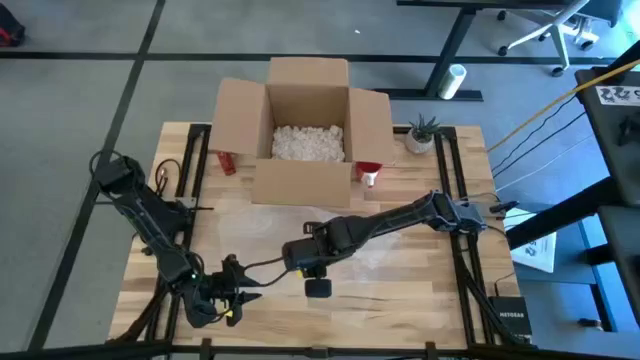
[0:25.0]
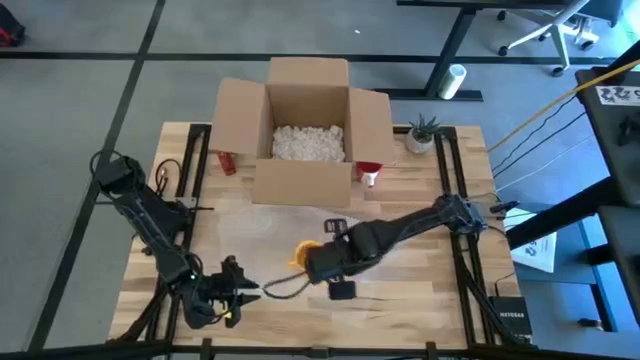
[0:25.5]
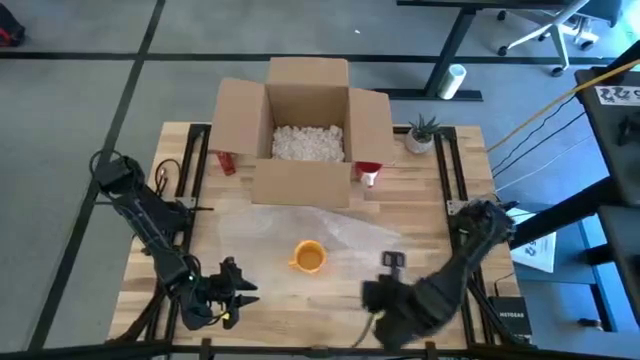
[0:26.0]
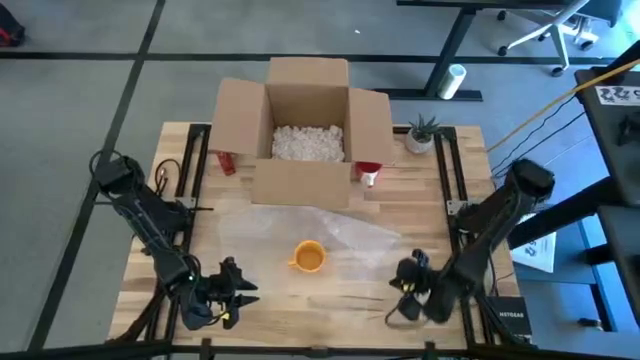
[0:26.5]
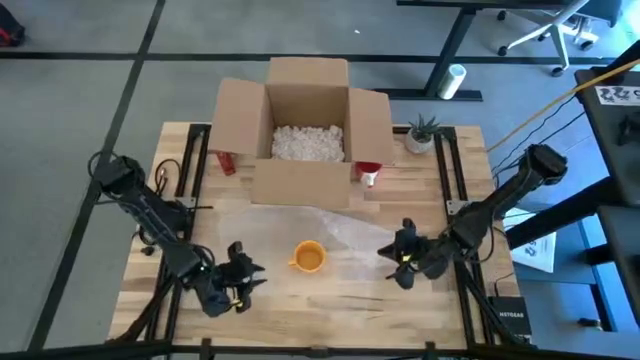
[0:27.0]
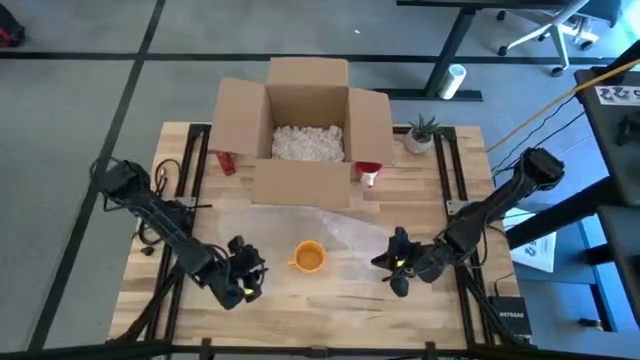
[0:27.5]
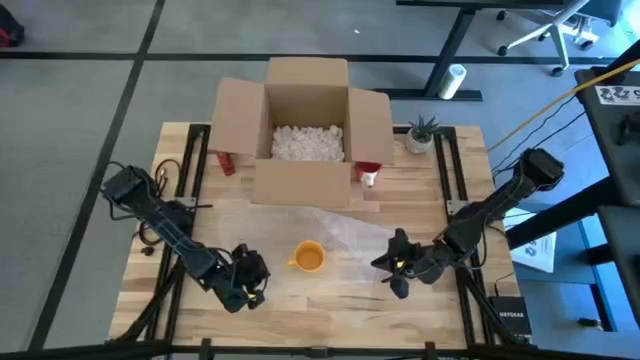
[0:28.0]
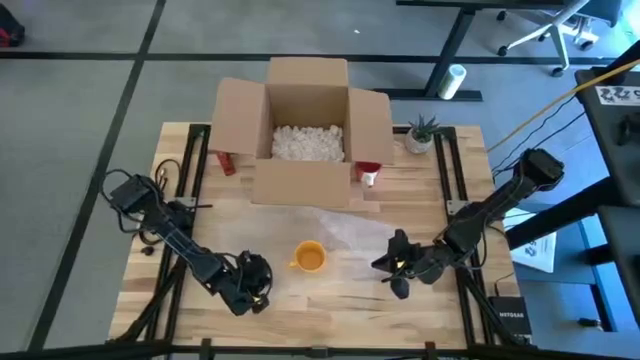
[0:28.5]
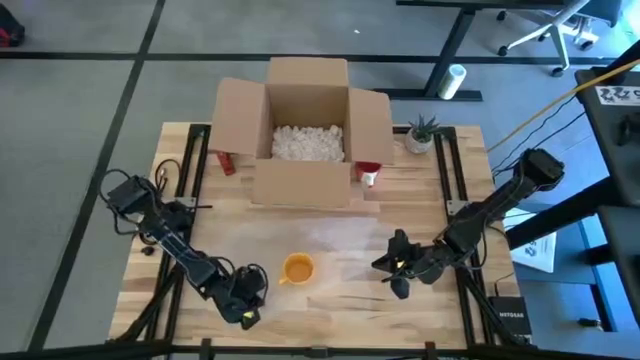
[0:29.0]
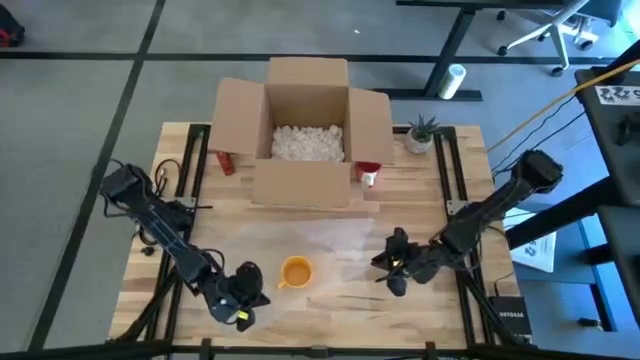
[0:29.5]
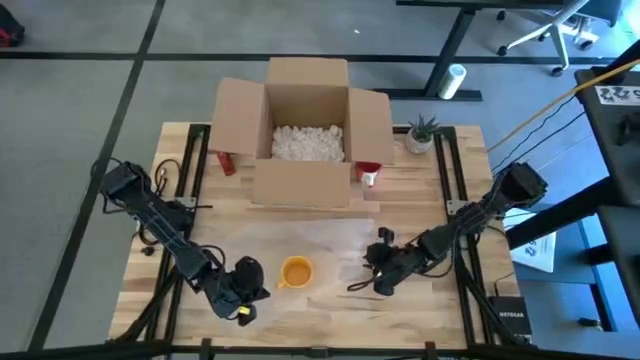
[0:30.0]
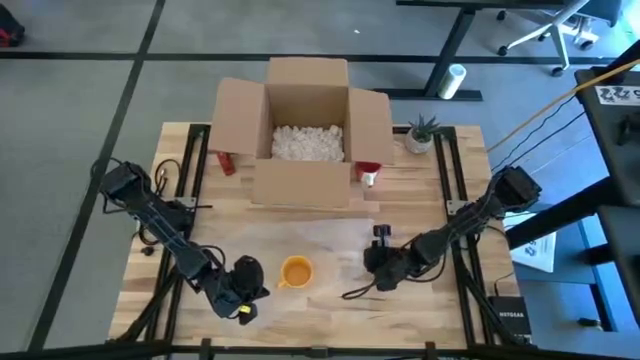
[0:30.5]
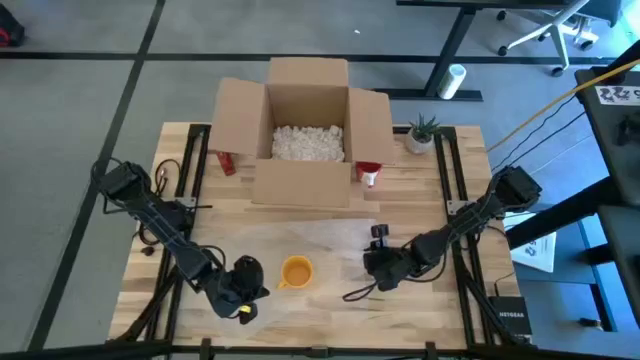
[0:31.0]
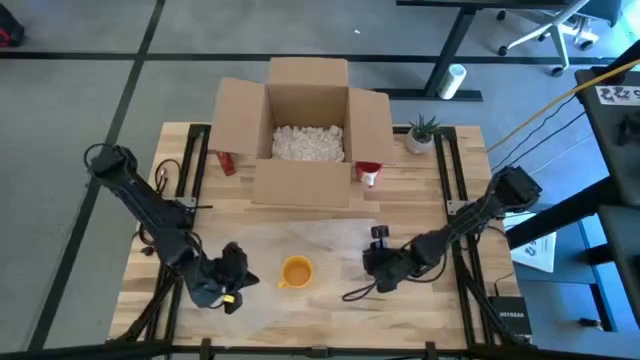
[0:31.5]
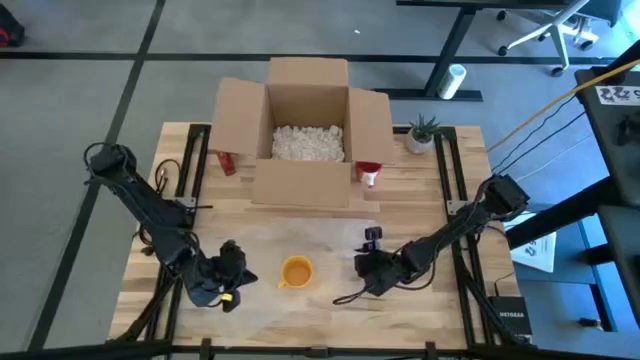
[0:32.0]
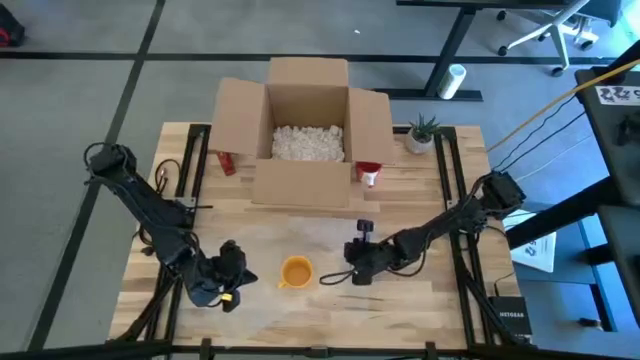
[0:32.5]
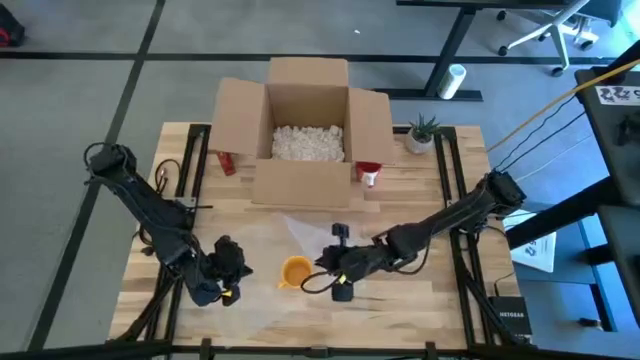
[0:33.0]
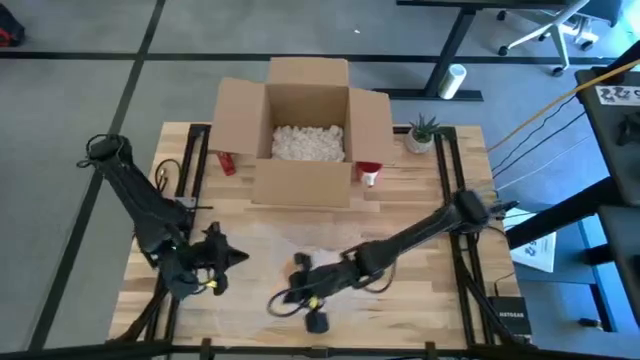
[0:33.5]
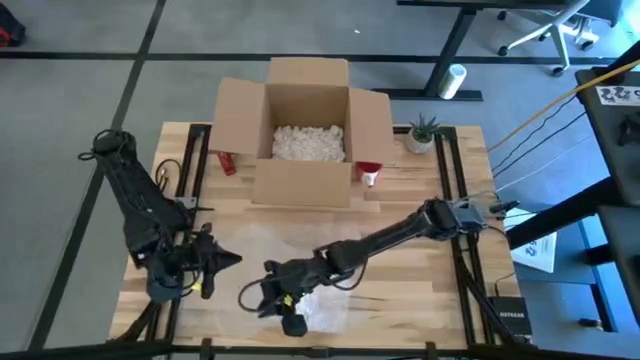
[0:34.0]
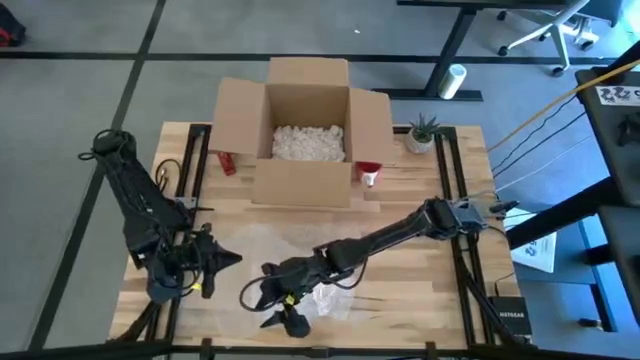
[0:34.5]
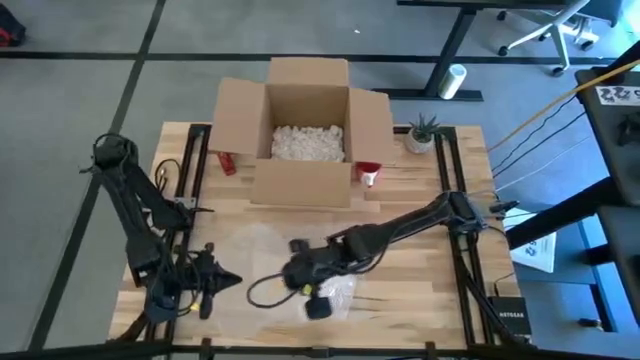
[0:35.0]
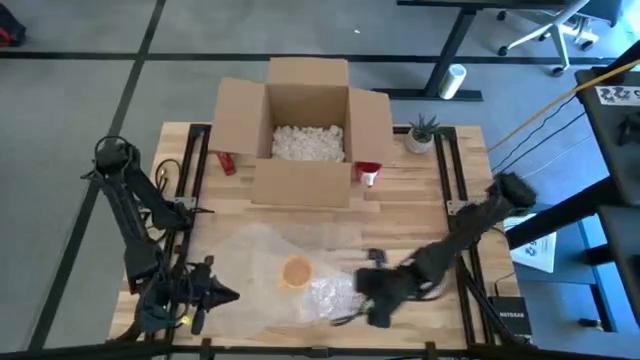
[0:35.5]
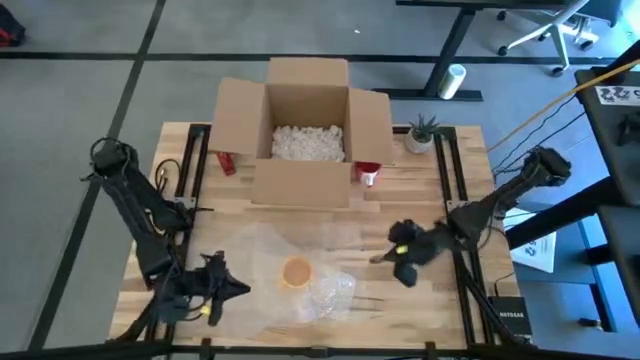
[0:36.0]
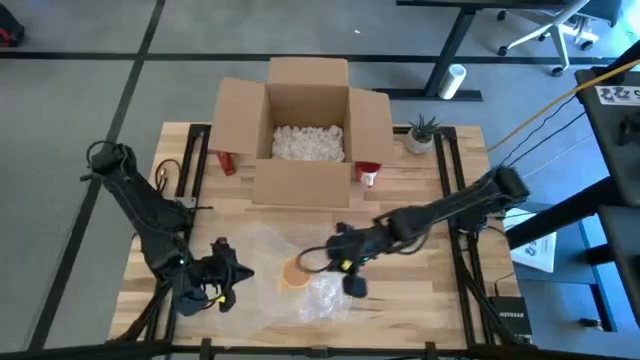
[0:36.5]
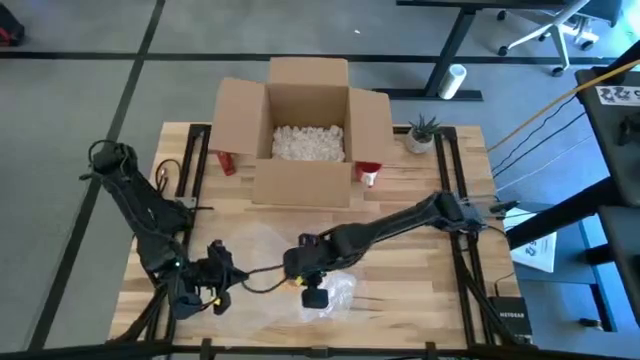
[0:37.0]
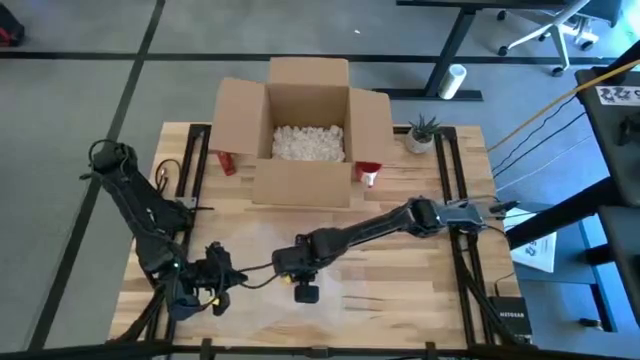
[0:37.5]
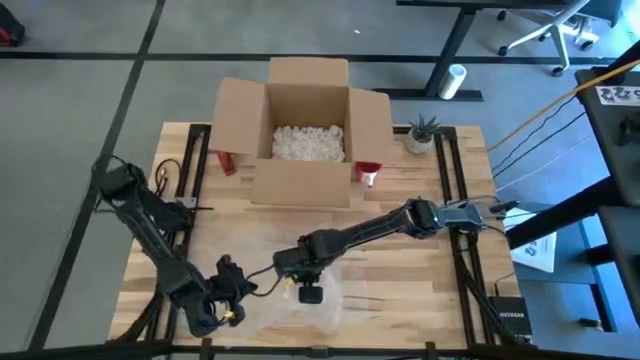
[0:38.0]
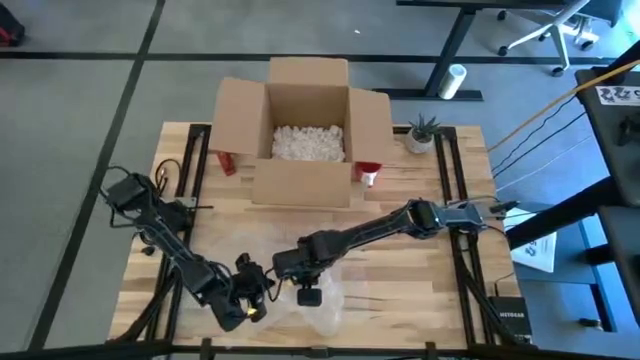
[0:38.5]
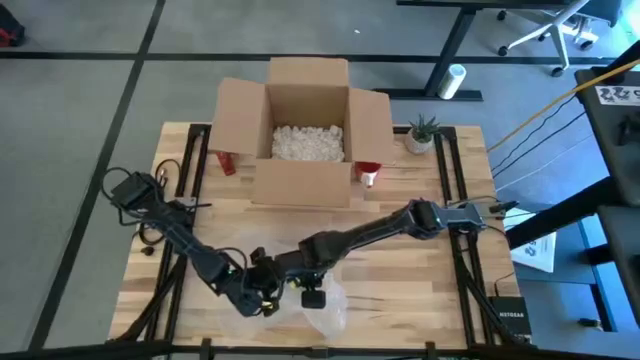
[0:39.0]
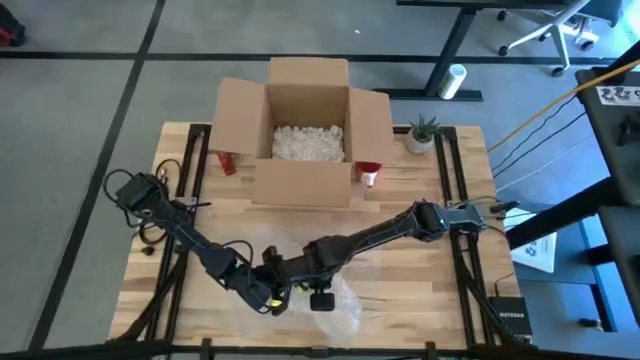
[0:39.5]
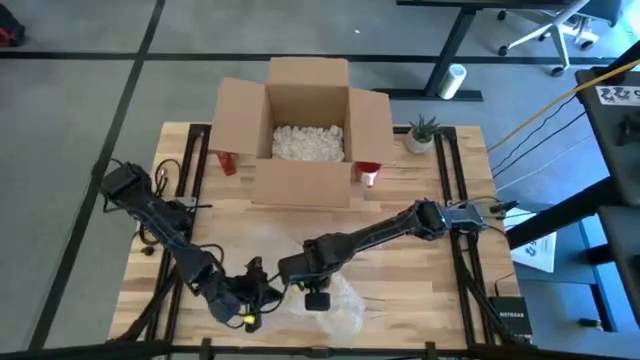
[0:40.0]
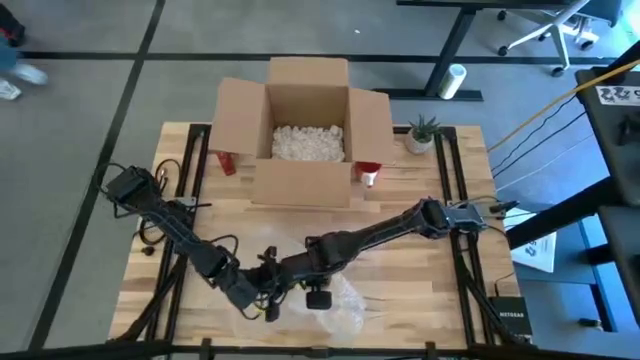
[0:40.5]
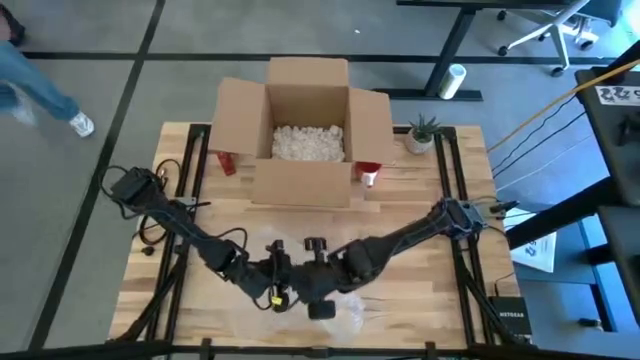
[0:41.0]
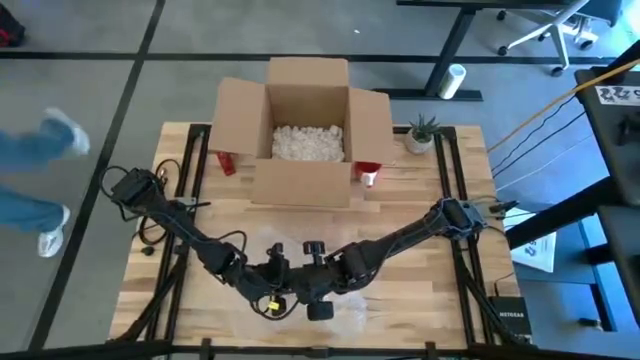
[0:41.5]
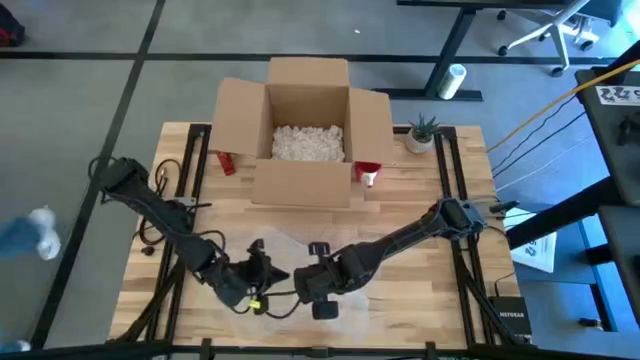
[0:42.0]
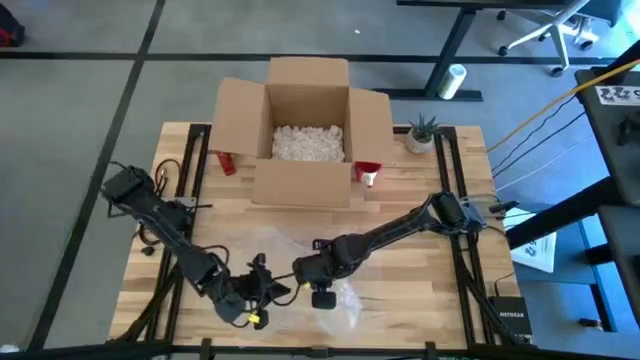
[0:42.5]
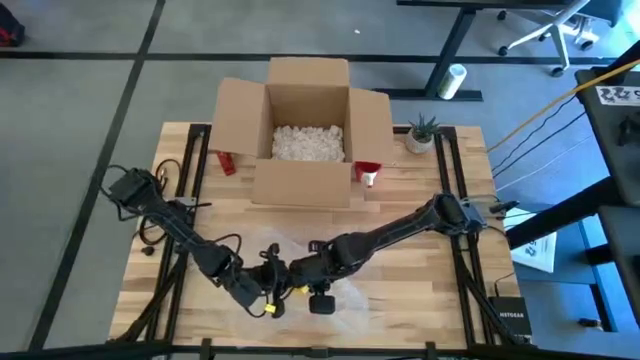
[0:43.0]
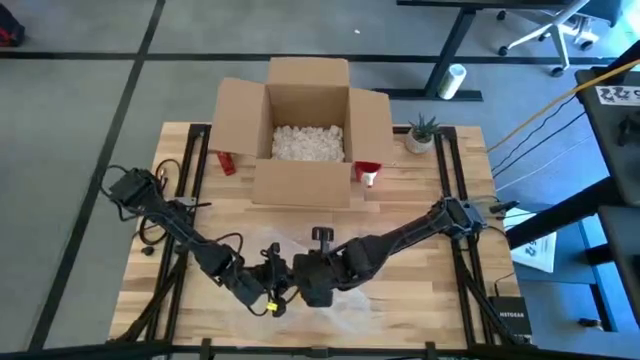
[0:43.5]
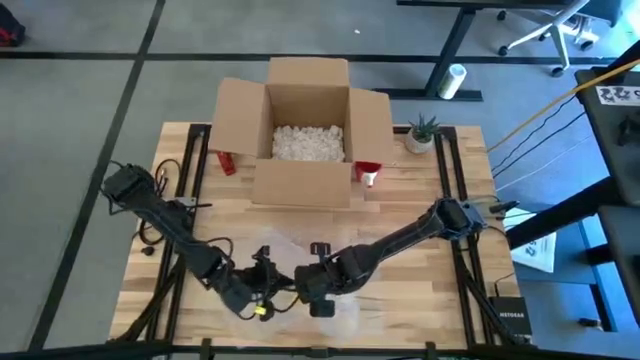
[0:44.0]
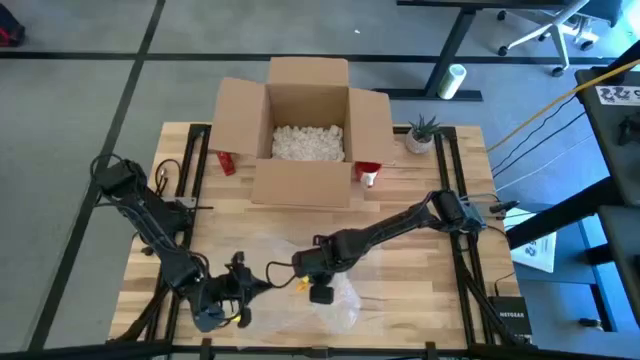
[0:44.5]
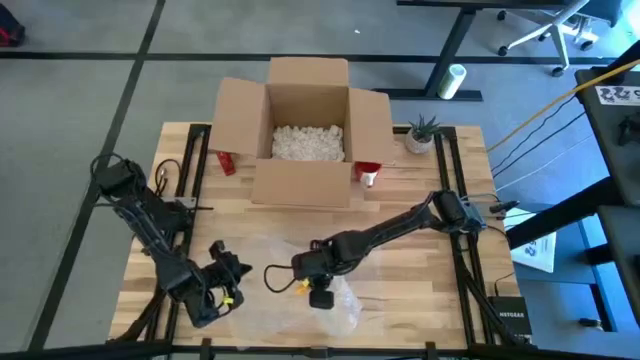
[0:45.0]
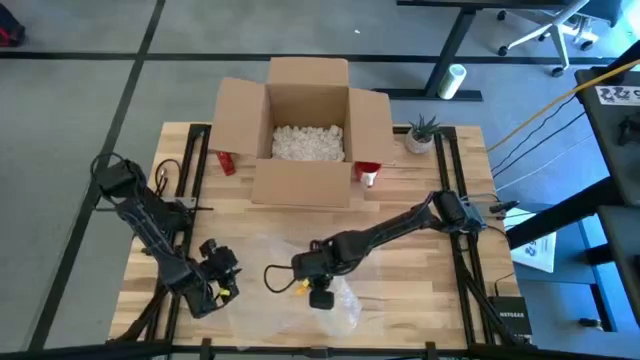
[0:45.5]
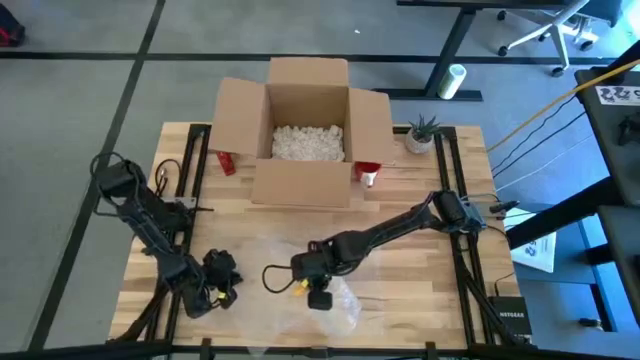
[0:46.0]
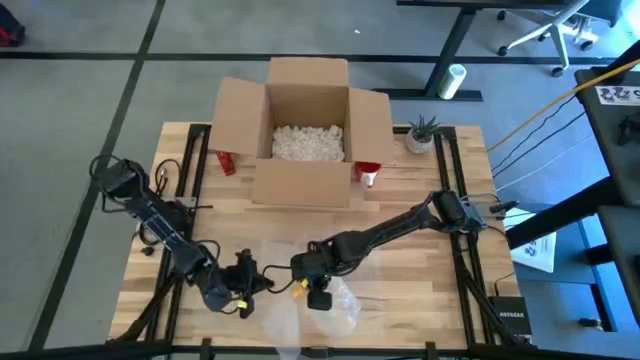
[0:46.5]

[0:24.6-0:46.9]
Task: wrap mug
Wrap the yellow mug with bubble wrap
